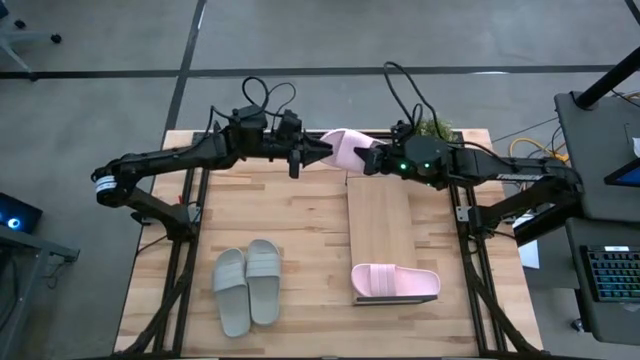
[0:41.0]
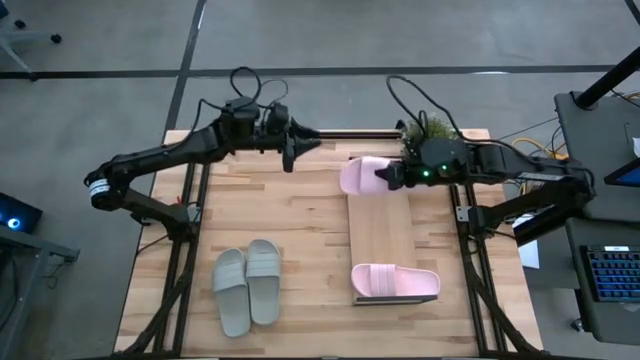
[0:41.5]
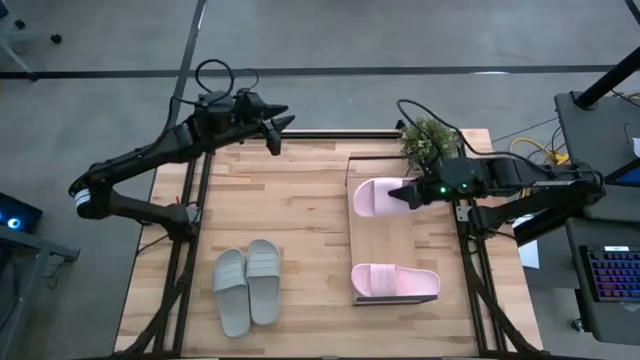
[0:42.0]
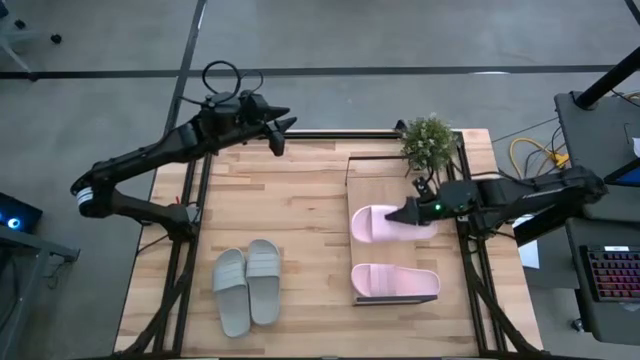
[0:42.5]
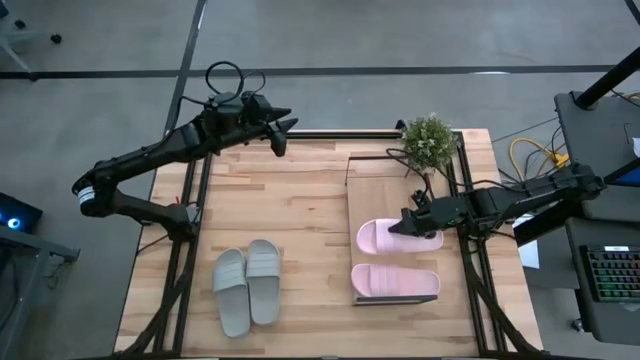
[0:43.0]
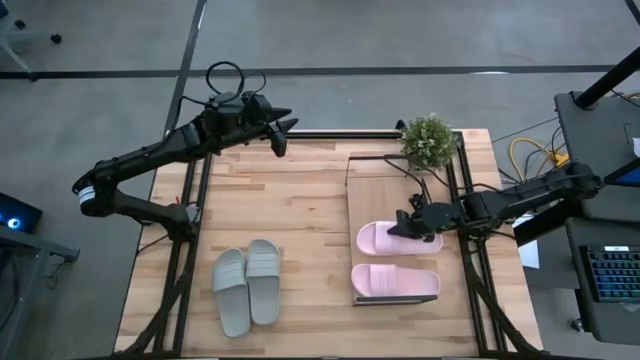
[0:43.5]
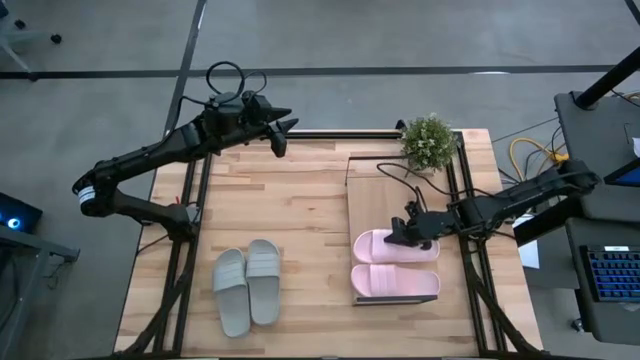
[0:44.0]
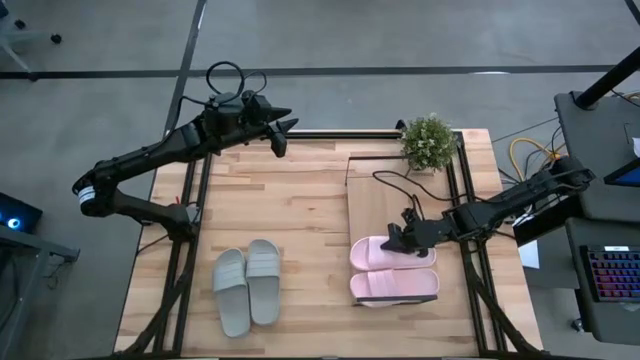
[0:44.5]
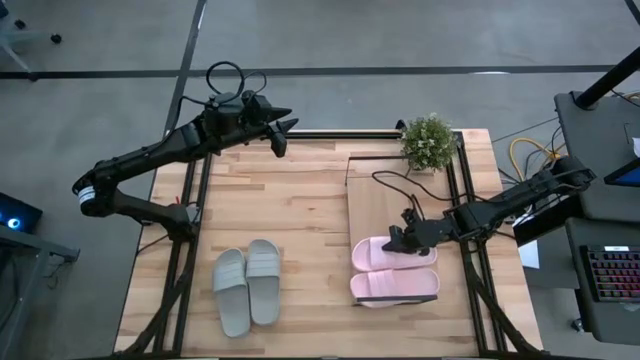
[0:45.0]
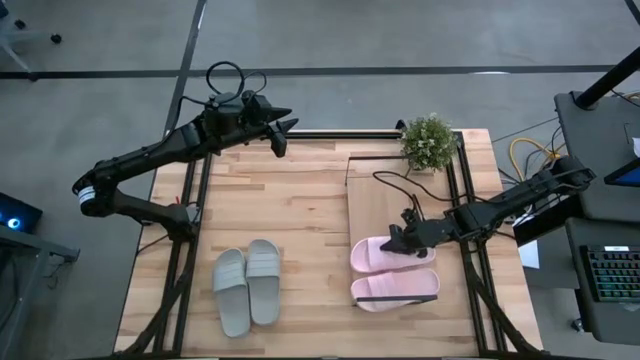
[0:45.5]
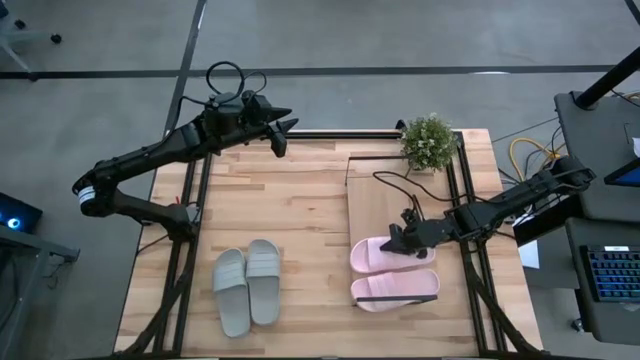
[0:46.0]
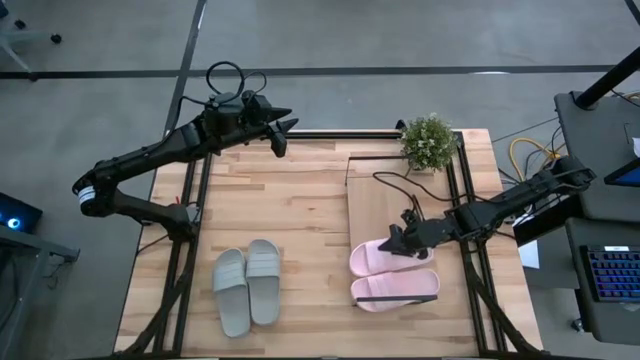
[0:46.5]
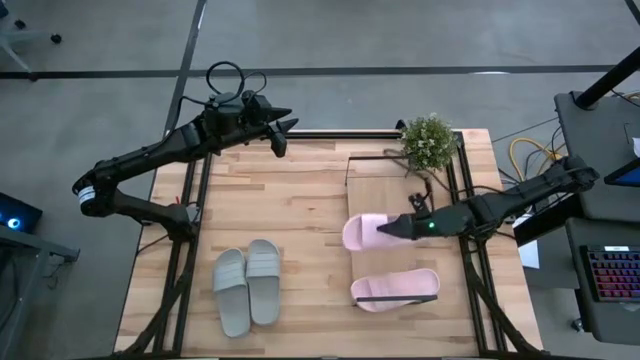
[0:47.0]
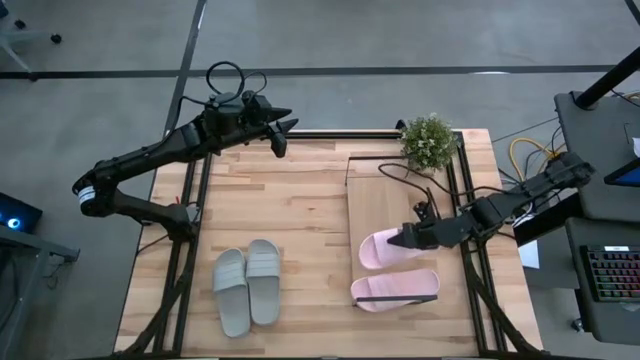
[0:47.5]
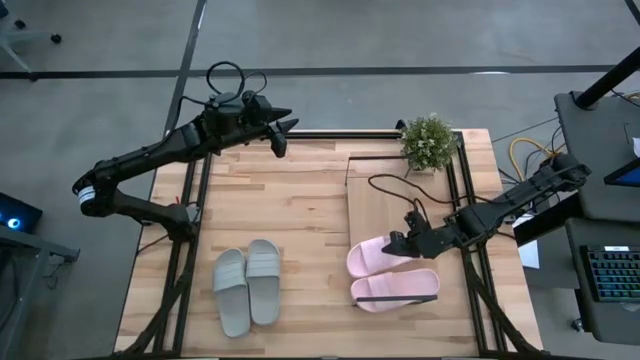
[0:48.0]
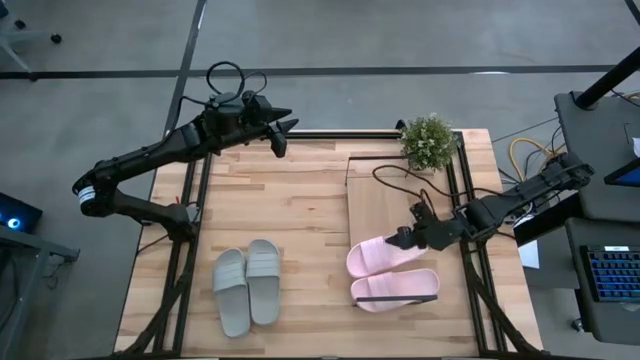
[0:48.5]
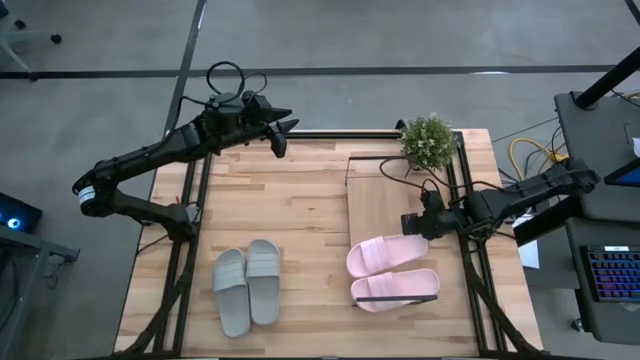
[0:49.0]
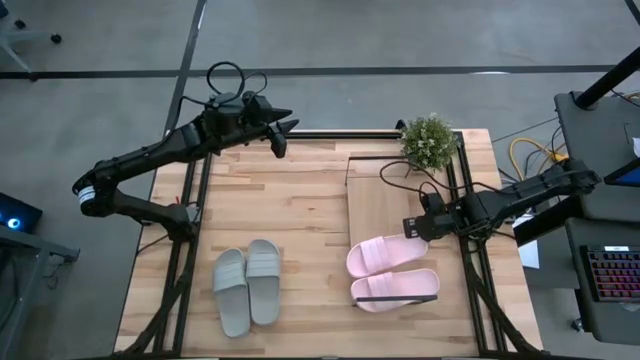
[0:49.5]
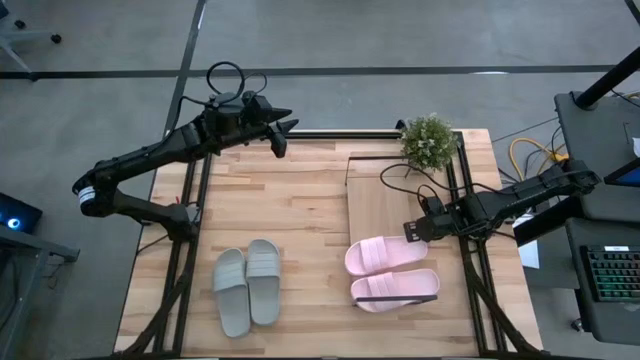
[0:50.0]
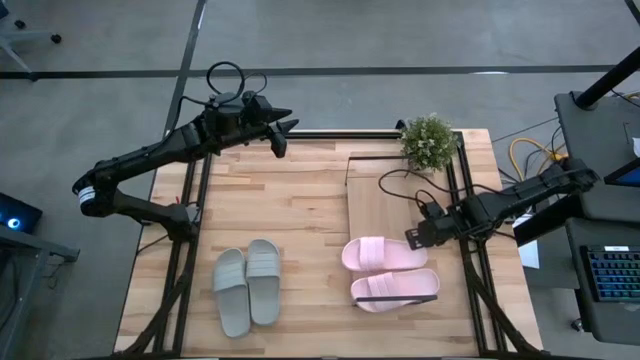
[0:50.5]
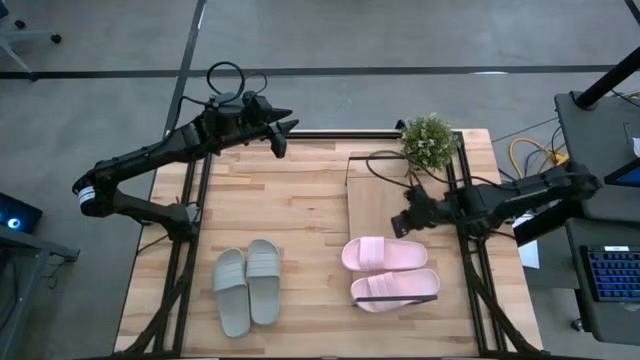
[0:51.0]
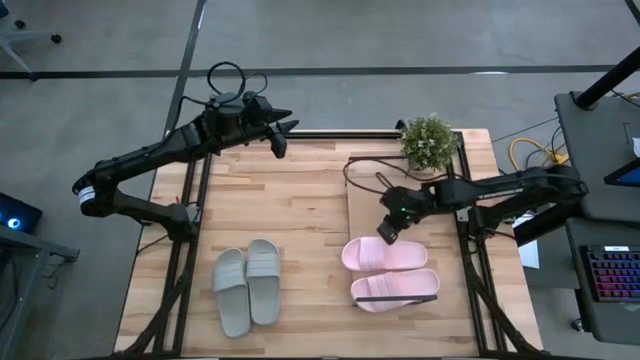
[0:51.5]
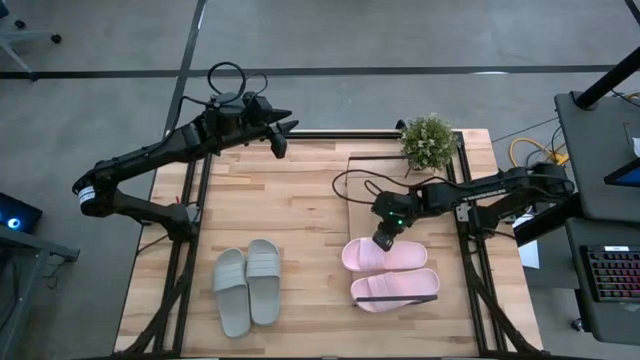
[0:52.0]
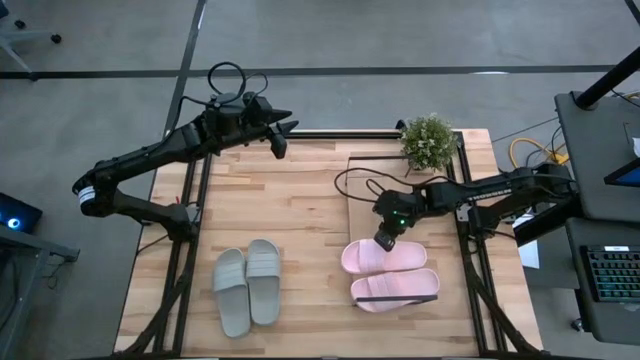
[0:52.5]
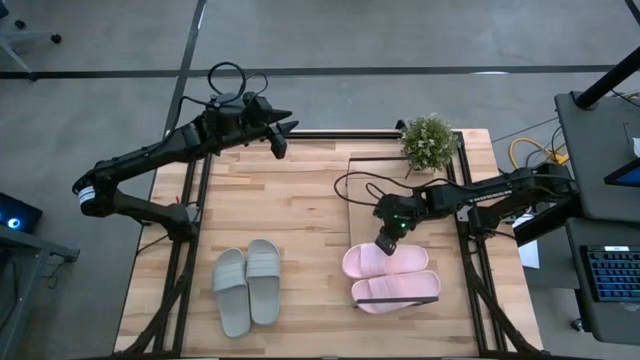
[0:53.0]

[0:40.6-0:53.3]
Task: Pick and place slides into the shelf
Put the pink slide on the shelf

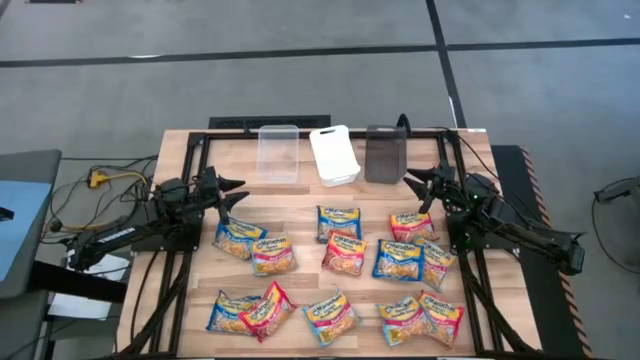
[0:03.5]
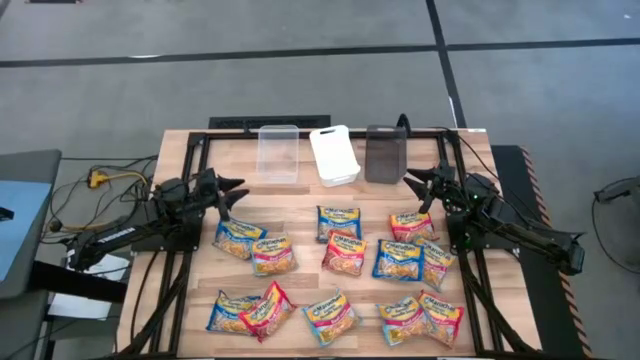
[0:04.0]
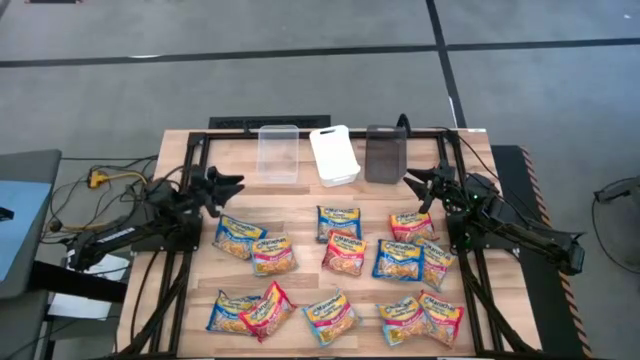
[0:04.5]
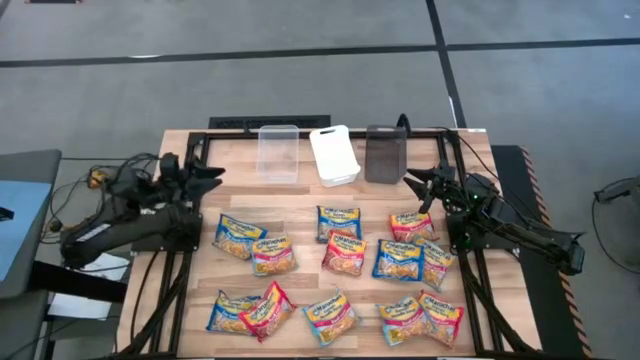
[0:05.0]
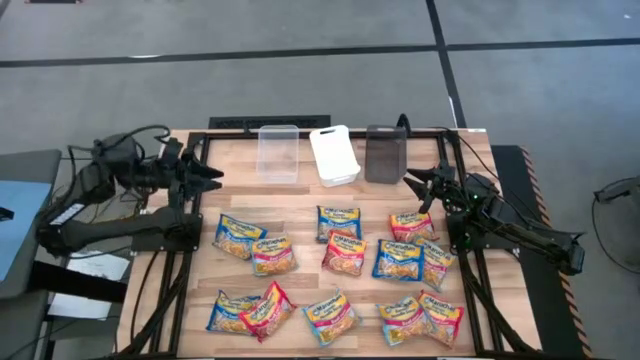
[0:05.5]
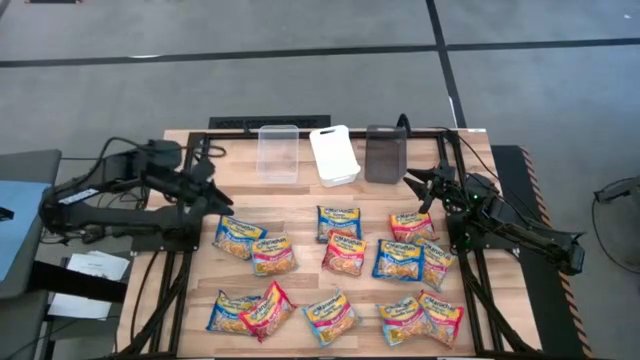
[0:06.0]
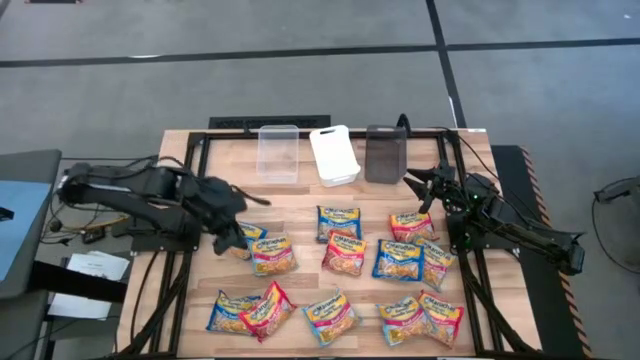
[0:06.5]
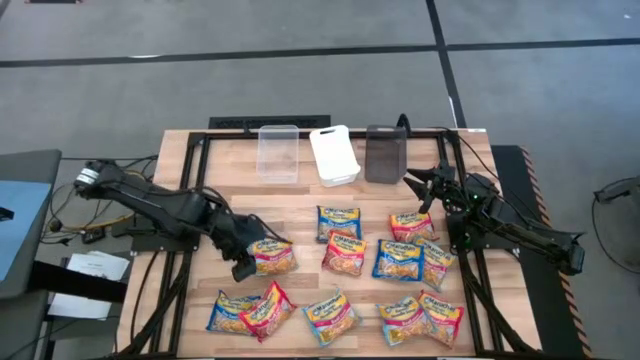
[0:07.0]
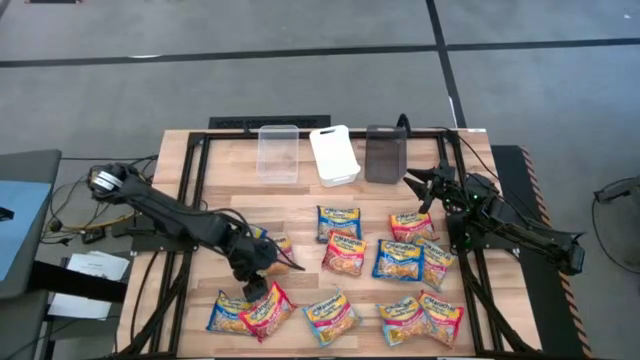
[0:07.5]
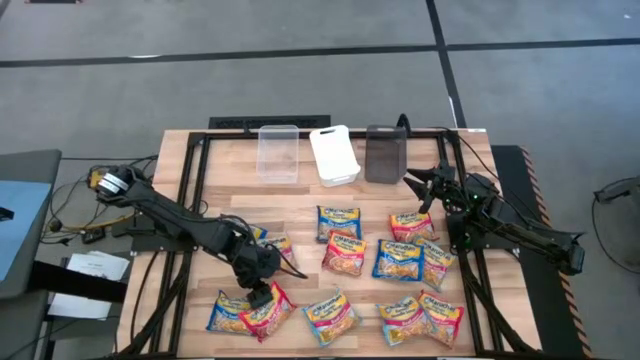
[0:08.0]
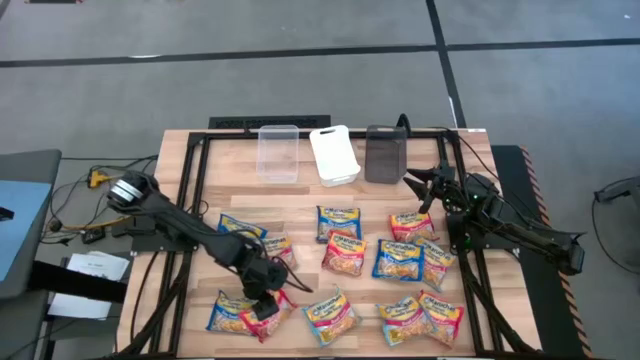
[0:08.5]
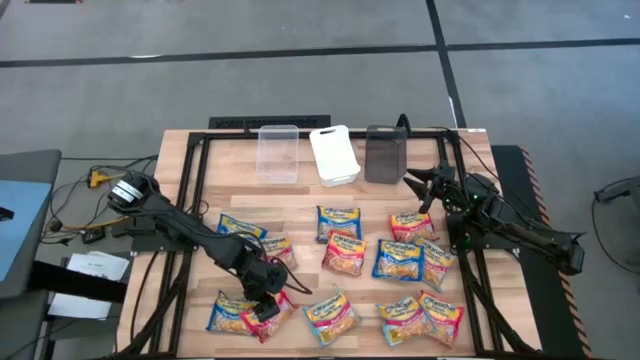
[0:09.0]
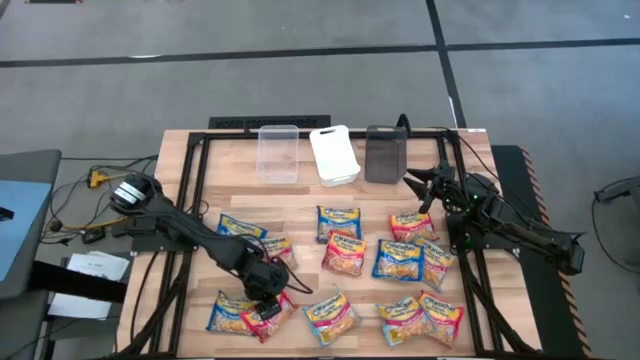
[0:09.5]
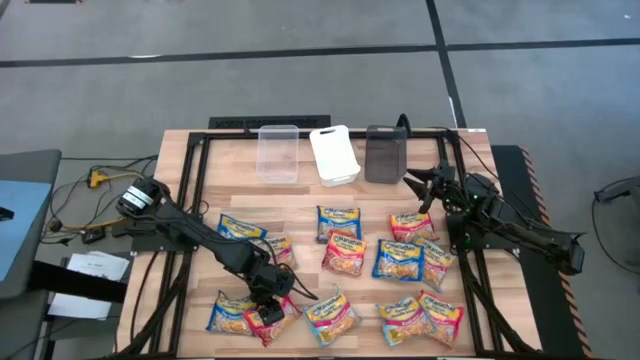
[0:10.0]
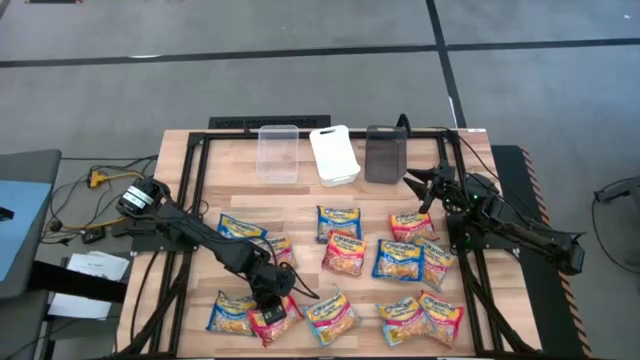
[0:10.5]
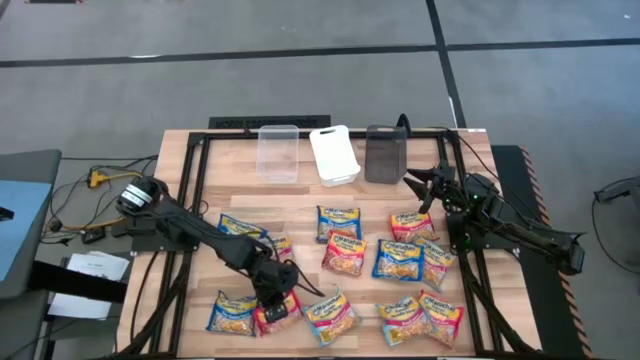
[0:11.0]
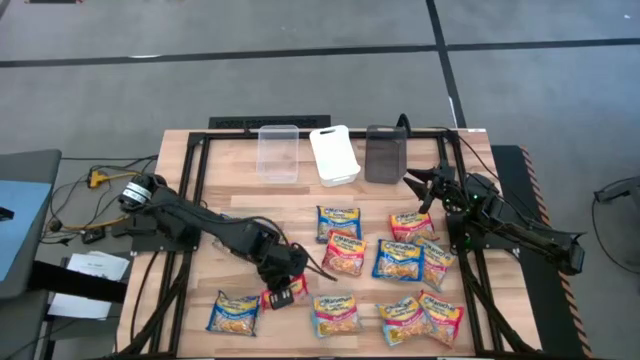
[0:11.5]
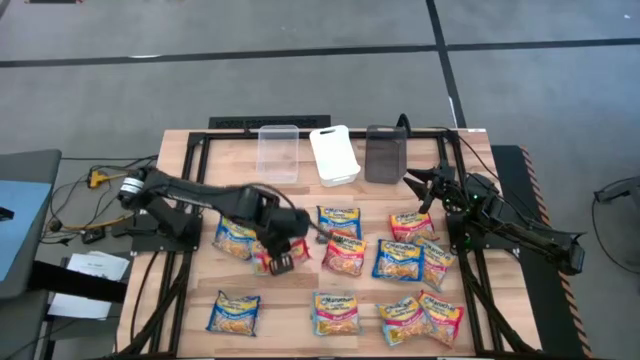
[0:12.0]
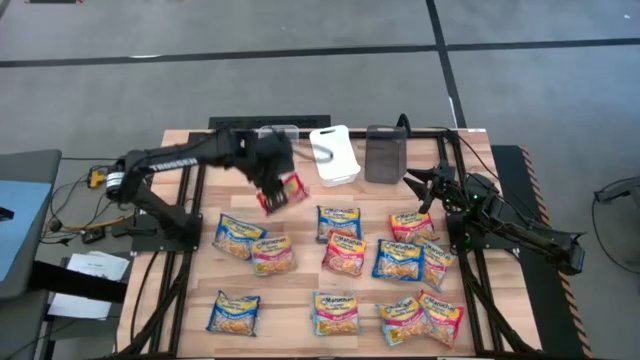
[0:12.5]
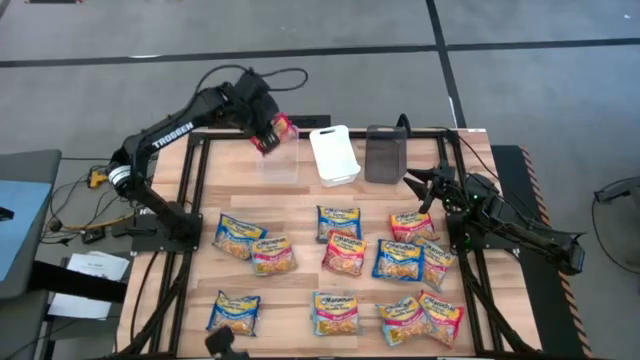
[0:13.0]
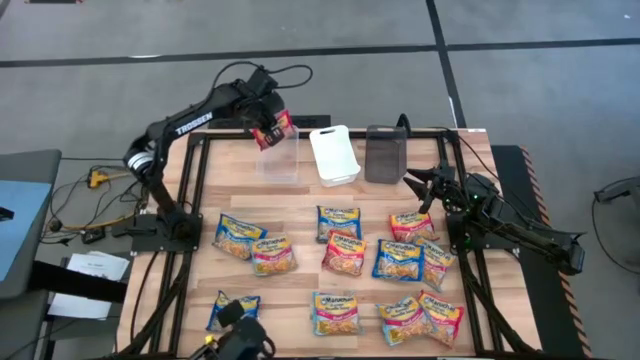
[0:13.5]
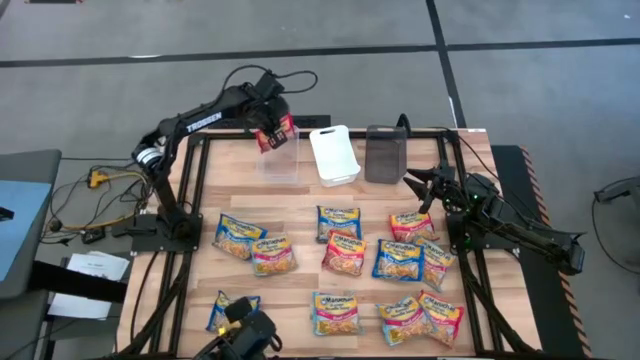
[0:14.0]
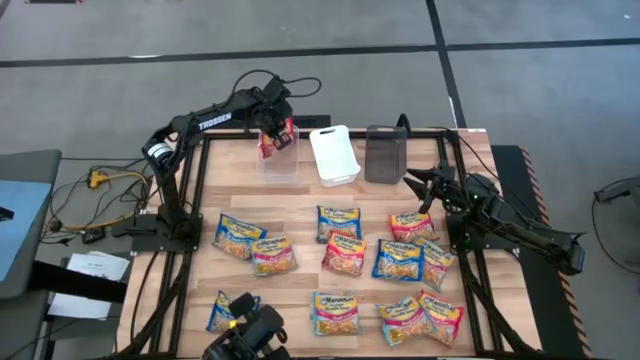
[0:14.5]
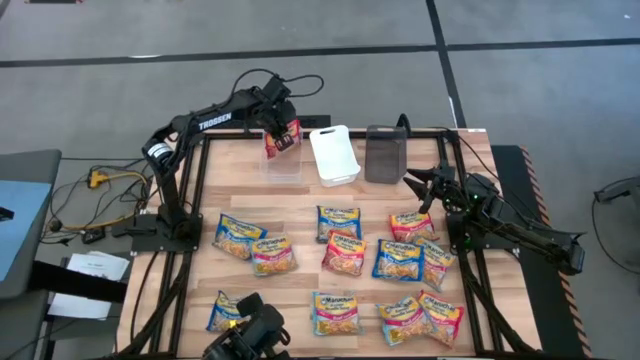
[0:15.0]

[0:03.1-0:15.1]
Task: Sort Maruchan noodles
Put the red noodle pack into the transparent bin
